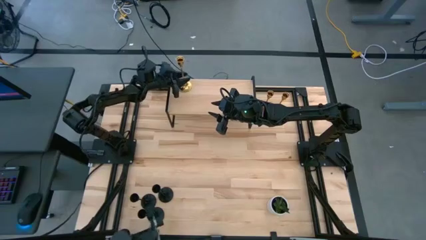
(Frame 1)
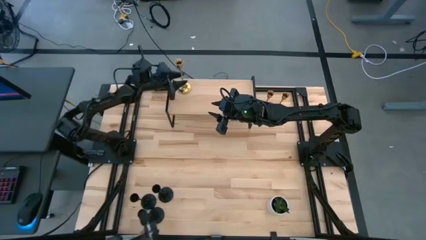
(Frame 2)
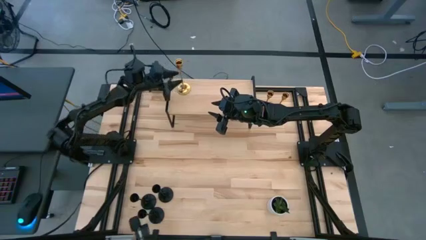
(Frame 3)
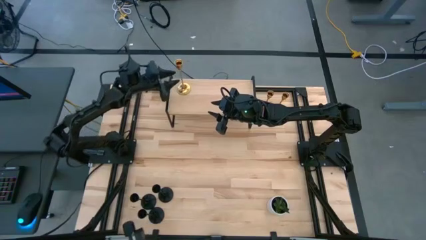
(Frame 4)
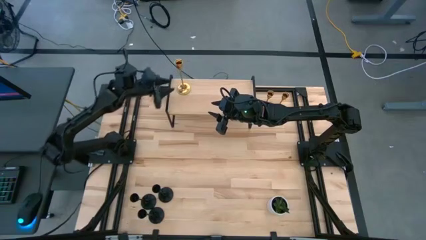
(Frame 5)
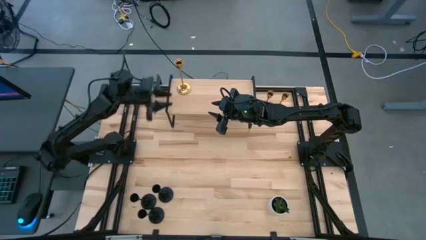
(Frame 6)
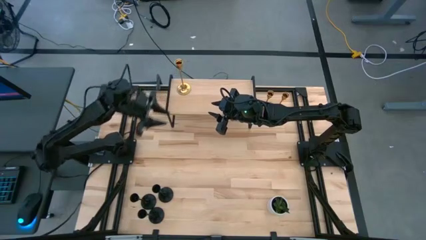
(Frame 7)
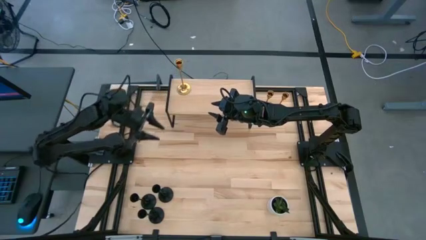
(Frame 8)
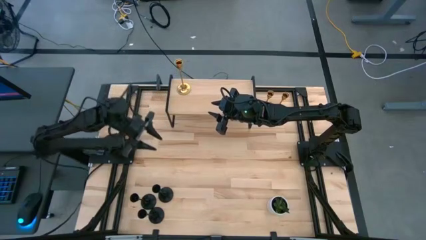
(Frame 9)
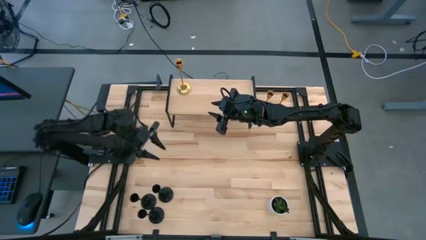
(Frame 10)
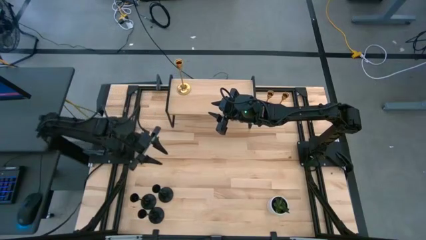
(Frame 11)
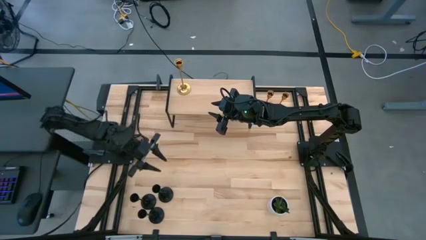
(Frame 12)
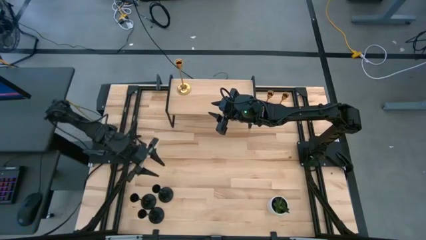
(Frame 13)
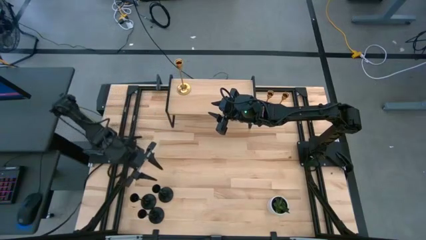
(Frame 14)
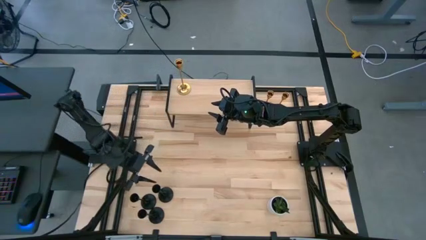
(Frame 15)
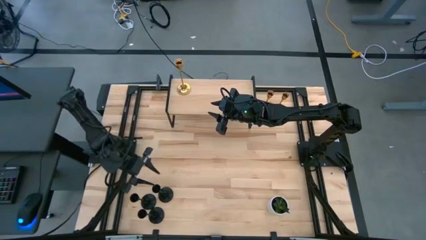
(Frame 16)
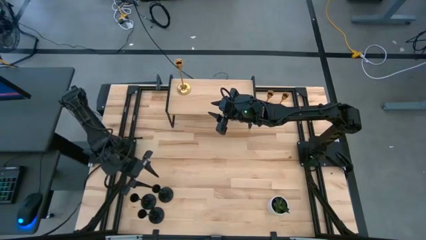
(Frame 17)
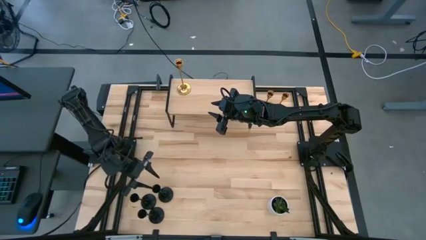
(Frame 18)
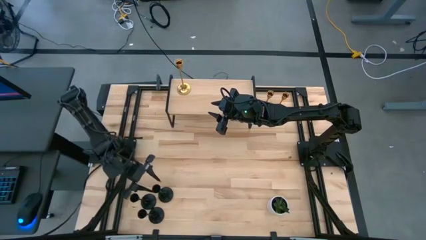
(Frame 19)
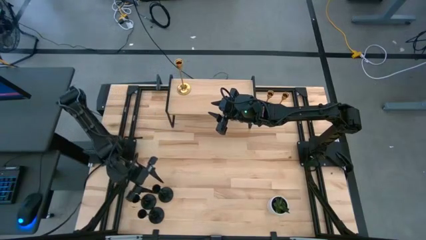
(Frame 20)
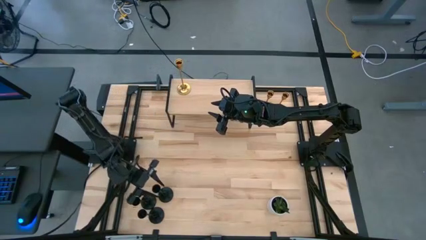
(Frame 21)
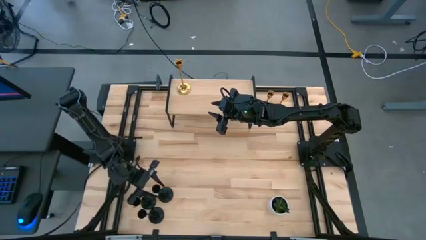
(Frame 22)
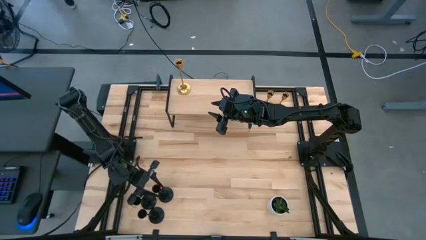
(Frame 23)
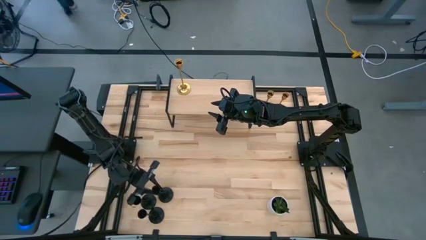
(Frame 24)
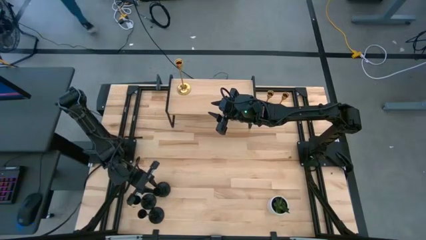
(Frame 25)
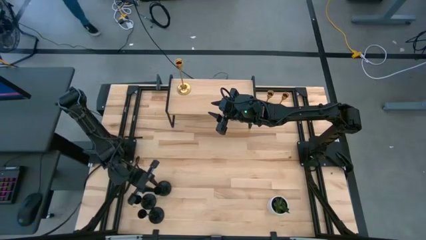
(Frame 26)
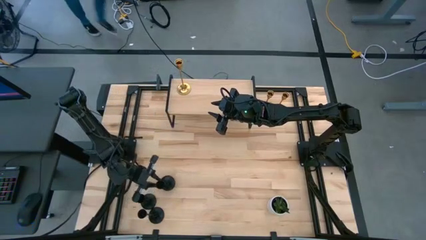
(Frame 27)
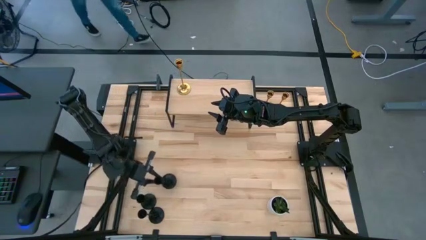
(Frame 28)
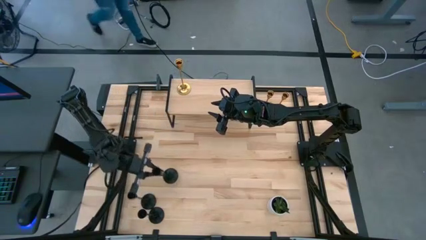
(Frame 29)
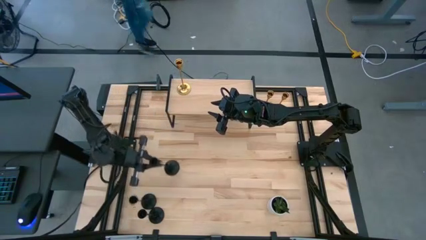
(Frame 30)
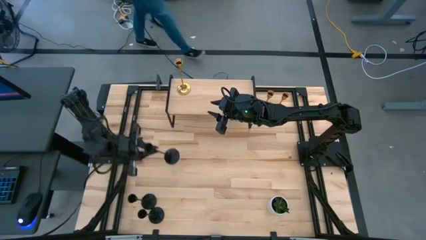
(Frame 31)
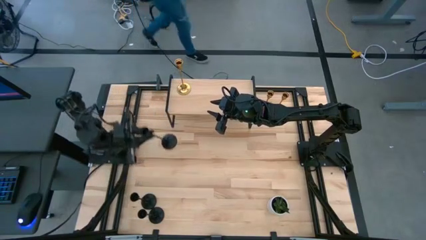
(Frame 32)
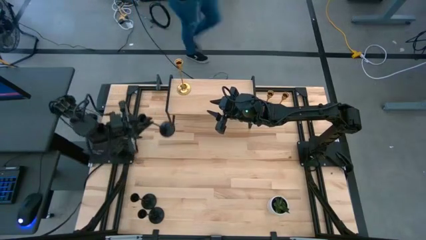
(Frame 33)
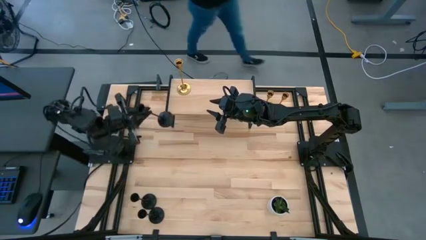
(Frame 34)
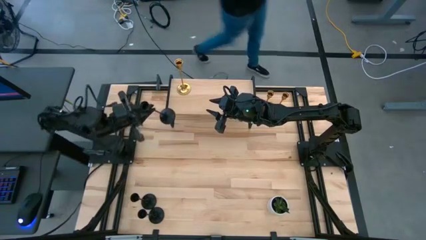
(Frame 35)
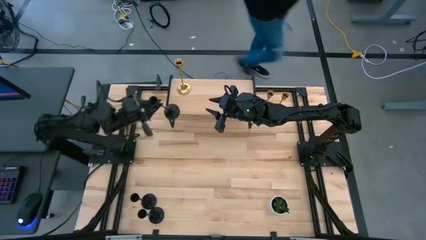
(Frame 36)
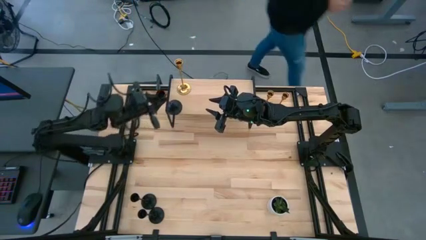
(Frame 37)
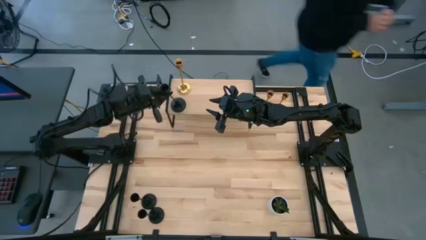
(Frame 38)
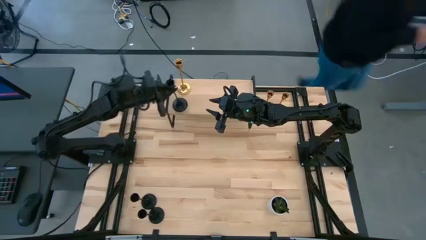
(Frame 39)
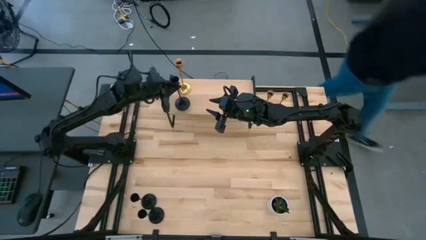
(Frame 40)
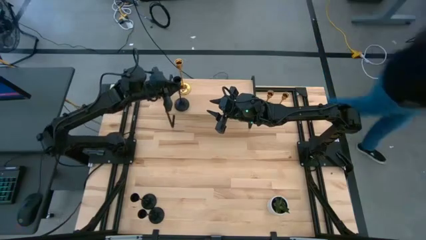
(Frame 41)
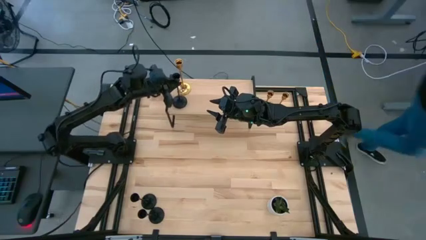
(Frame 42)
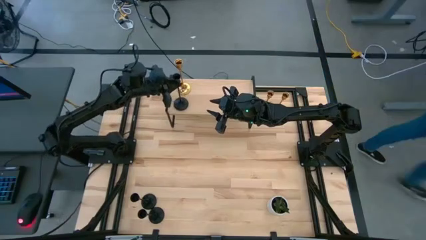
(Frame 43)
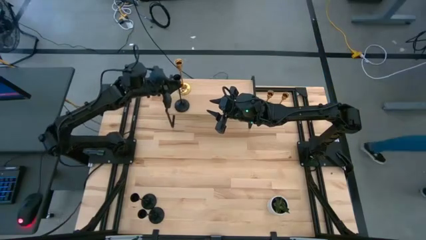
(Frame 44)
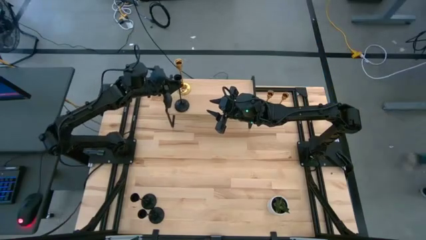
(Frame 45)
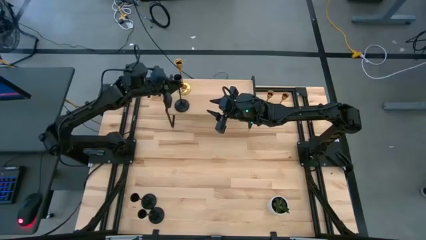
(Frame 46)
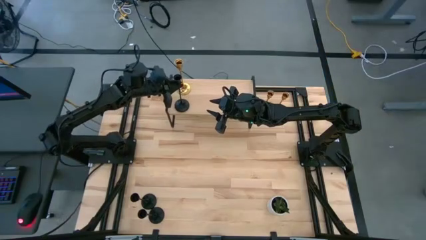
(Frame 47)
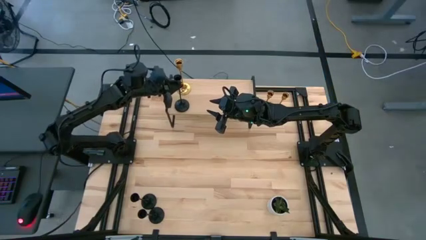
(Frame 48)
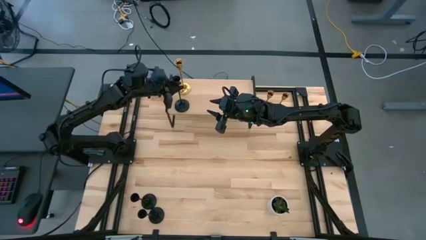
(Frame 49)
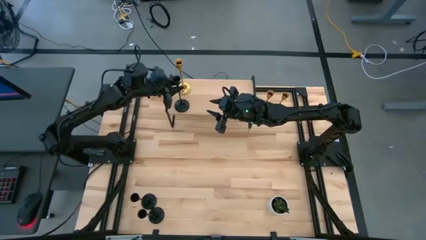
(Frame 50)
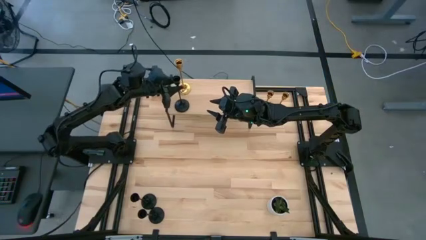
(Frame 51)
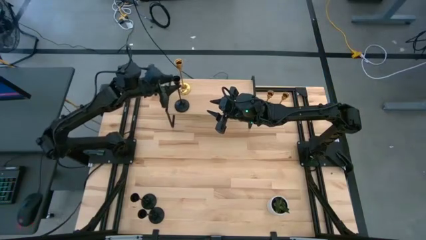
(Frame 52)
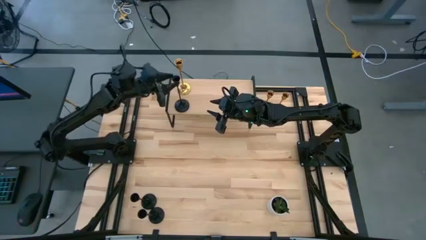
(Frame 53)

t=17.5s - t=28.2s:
Task: Pick & Place candle stick holders
Put the top right black candle holder on the shelf

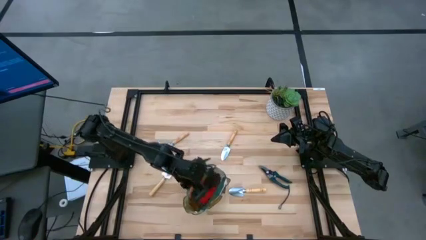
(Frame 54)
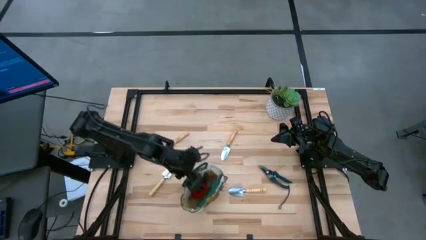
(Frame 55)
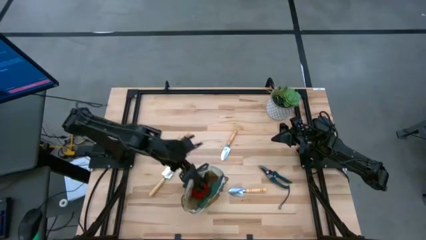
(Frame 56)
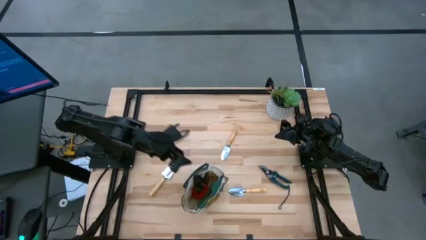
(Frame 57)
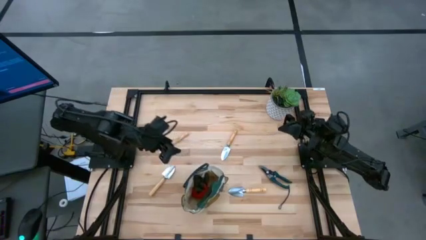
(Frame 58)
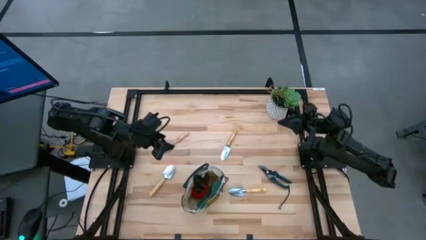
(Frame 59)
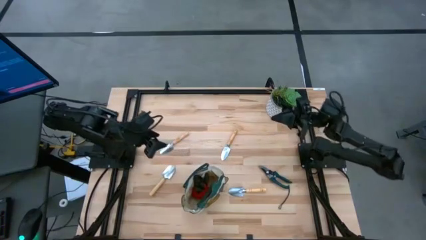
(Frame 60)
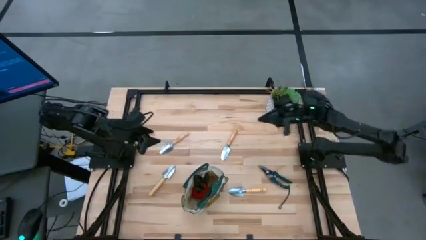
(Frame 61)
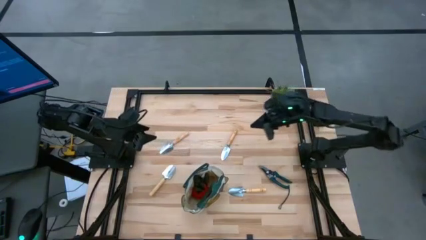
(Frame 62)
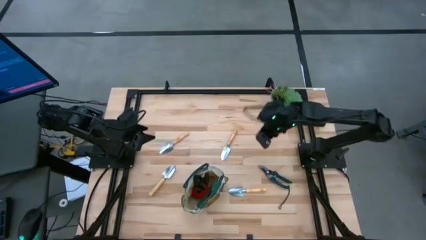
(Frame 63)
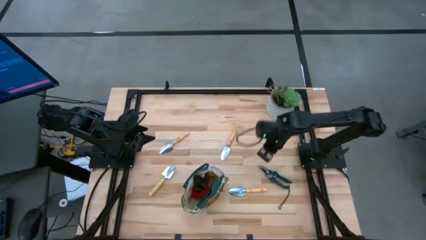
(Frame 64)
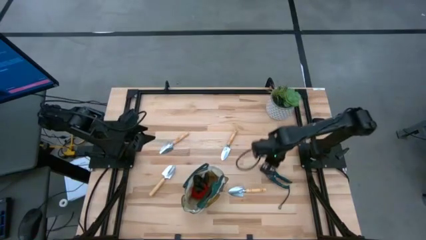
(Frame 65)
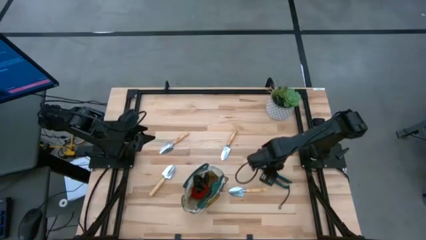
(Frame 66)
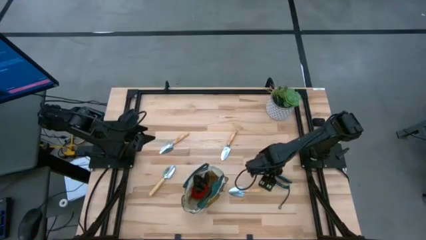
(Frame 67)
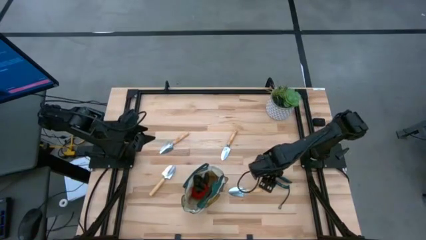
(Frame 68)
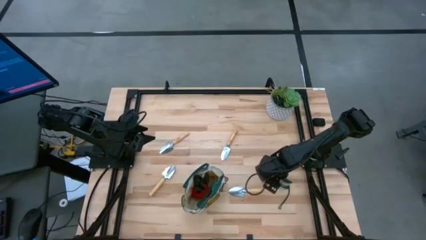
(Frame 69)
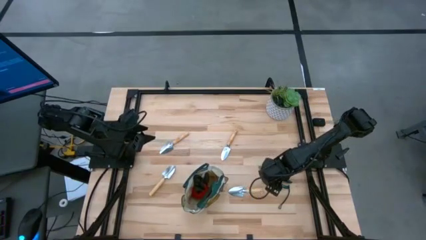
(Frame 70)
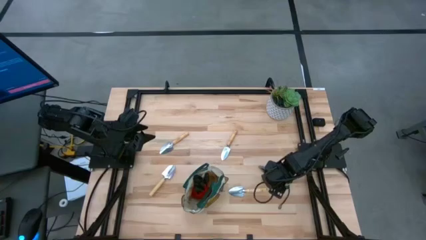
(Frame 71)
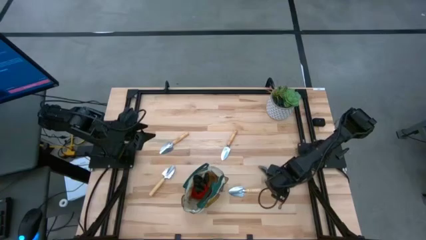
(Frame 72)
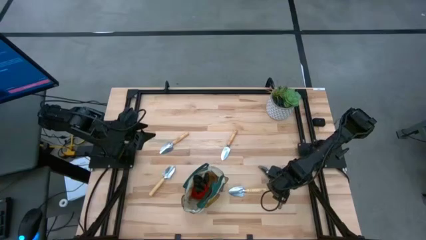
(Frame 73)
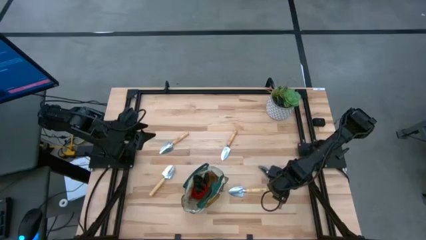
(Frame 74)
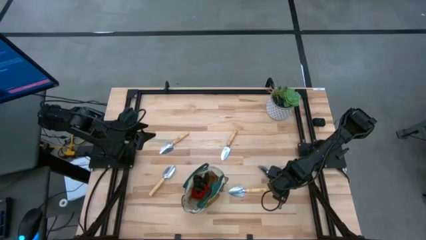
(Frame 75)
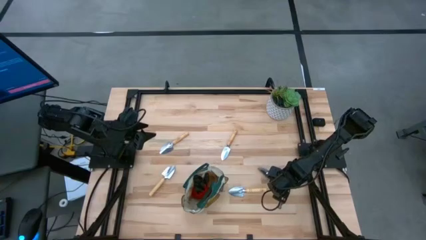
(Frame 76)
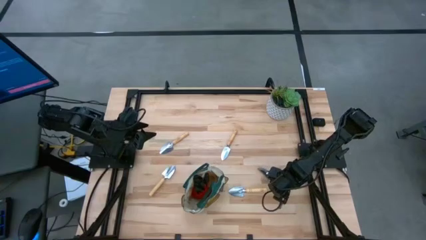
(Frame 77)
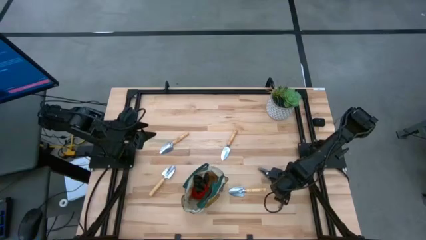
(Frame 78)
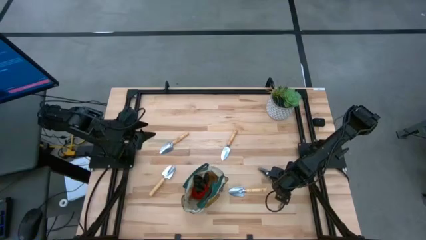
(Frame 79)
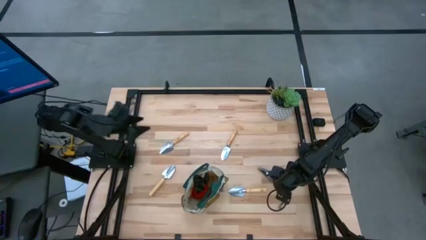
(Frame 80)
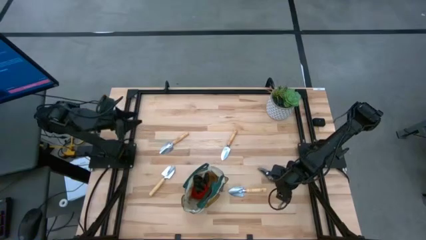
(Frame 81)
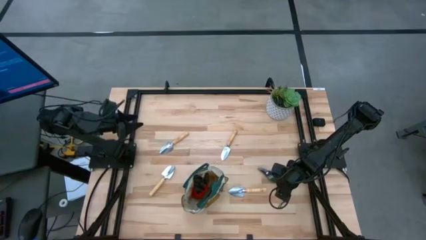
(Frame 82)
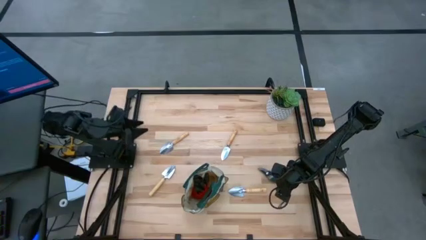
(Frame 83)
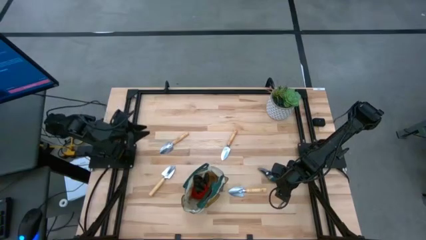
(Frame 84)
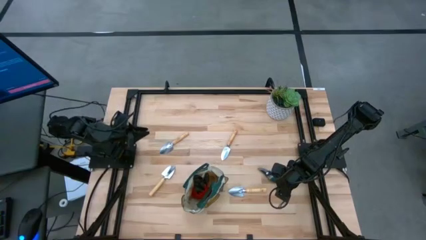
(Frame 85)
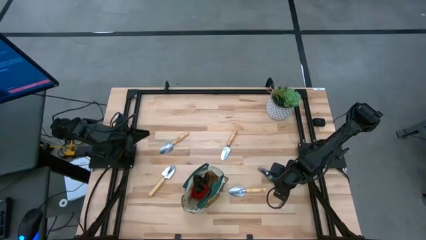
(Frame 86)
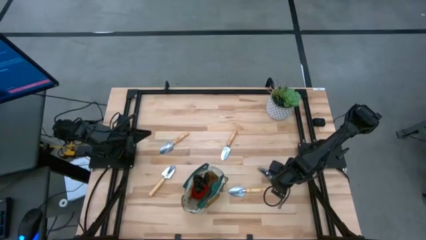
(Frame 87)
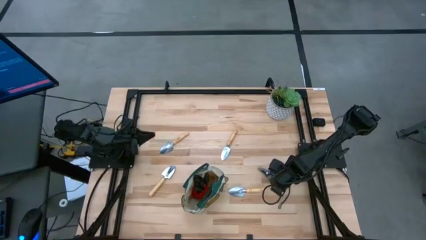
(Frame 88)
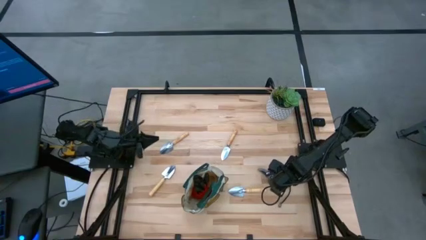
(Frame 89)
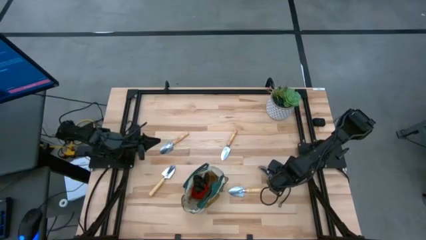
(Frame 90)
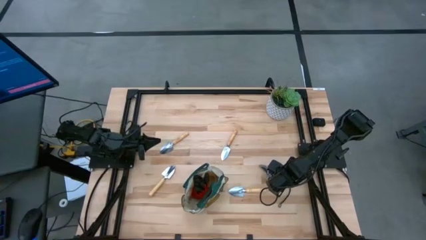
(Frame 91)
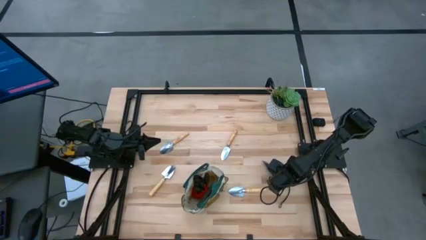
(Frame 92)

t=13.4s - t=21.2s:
Task: Pick & Place Garden tools in Gardening bag
Put the green shear scissors into the gardening bag
